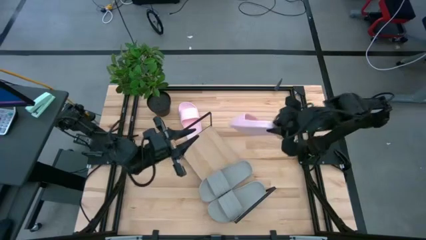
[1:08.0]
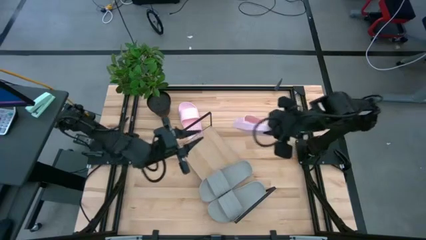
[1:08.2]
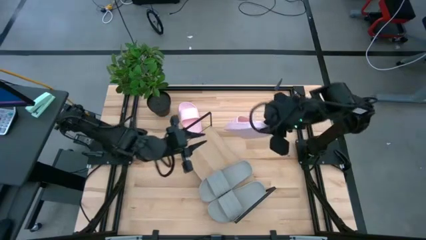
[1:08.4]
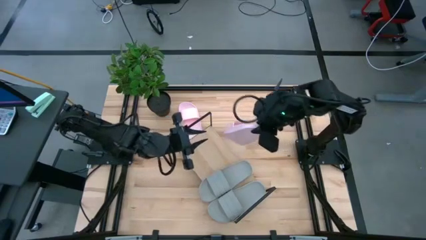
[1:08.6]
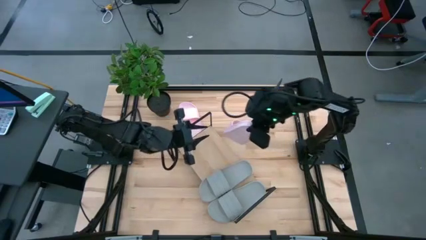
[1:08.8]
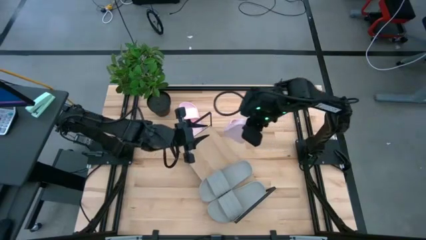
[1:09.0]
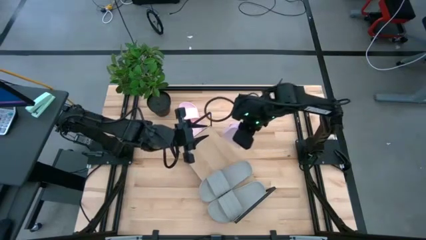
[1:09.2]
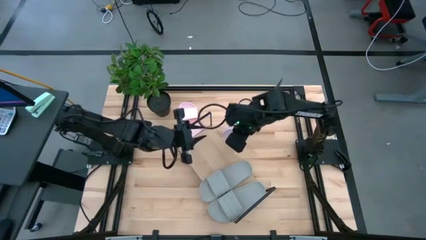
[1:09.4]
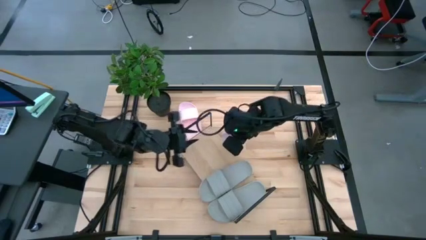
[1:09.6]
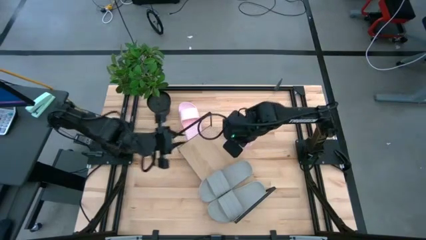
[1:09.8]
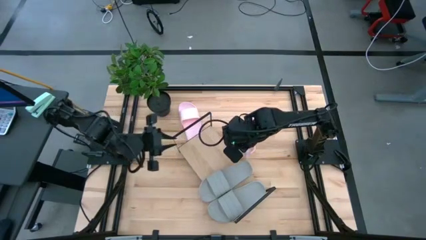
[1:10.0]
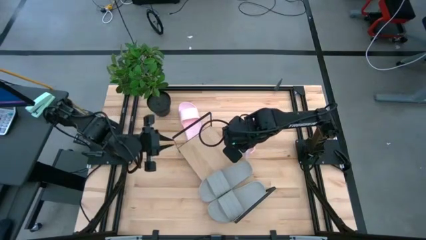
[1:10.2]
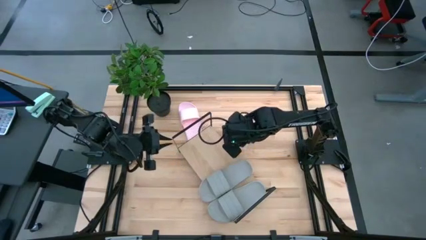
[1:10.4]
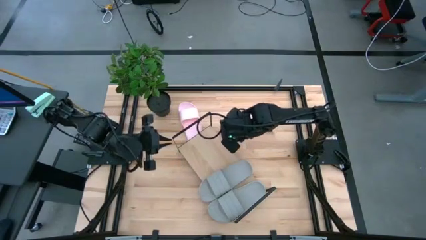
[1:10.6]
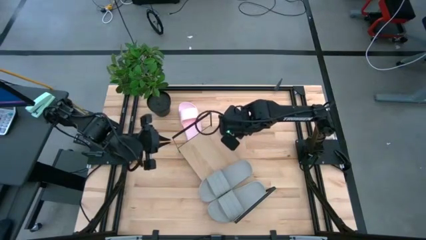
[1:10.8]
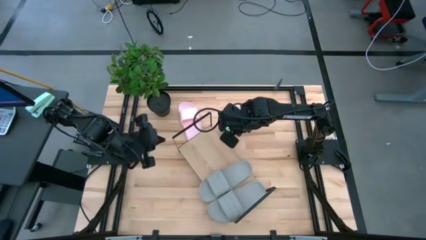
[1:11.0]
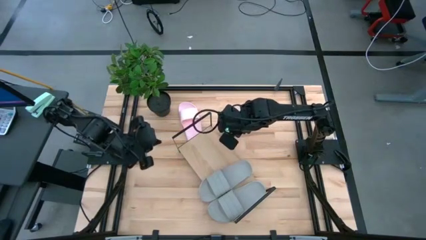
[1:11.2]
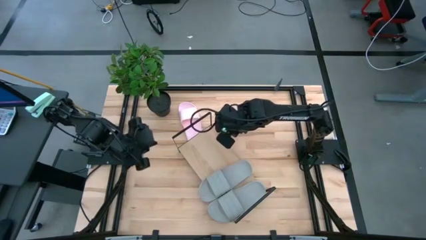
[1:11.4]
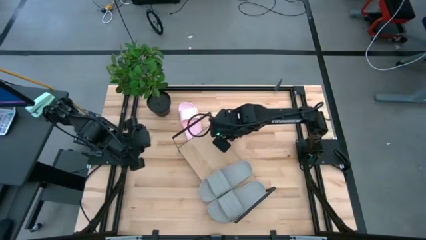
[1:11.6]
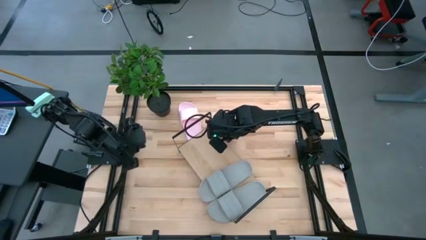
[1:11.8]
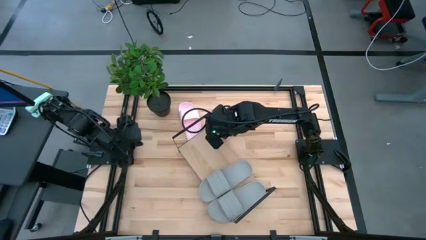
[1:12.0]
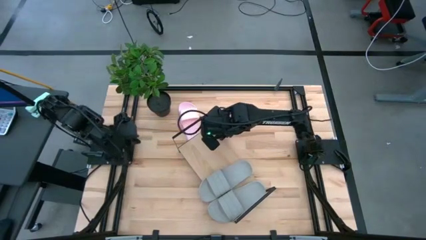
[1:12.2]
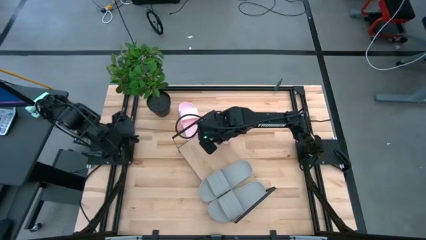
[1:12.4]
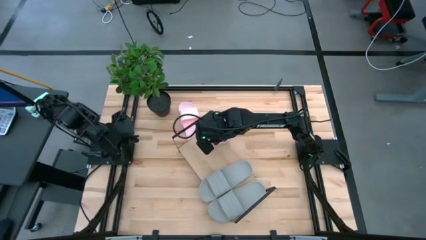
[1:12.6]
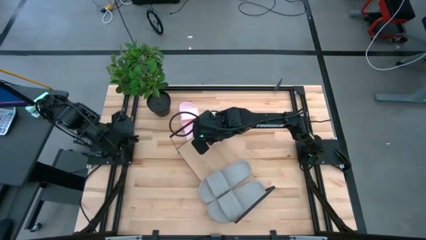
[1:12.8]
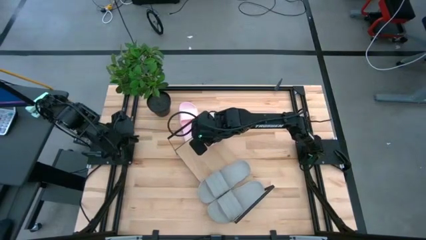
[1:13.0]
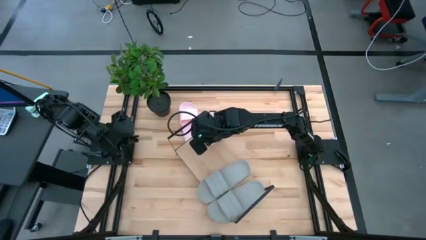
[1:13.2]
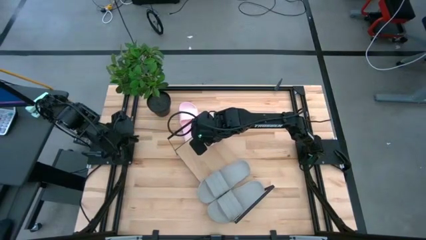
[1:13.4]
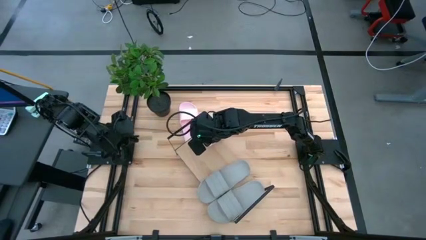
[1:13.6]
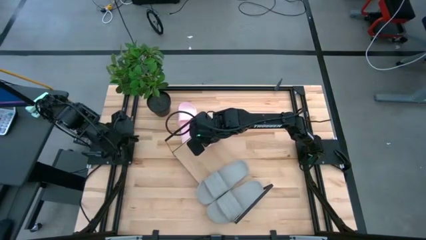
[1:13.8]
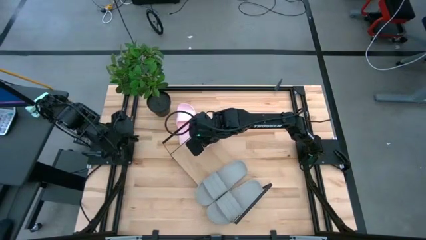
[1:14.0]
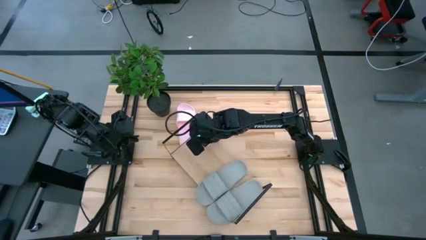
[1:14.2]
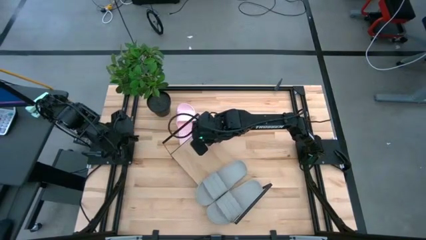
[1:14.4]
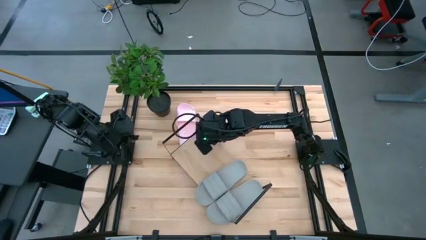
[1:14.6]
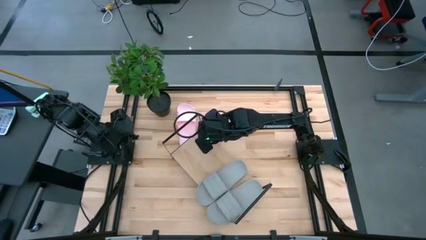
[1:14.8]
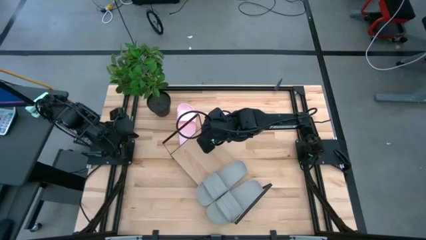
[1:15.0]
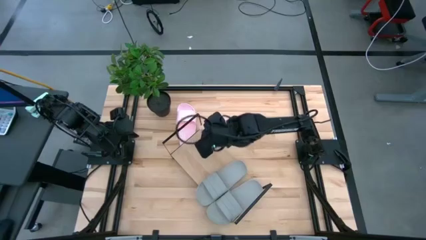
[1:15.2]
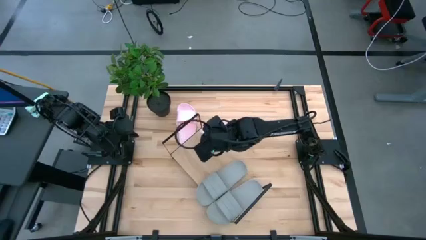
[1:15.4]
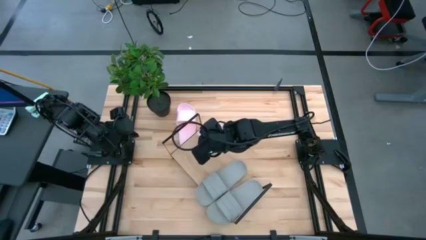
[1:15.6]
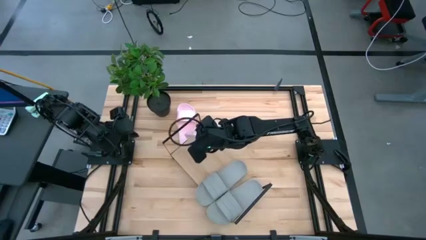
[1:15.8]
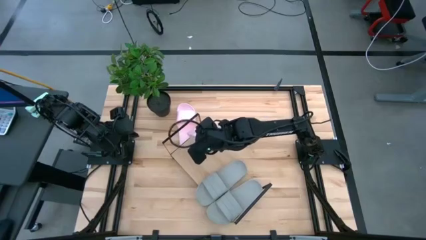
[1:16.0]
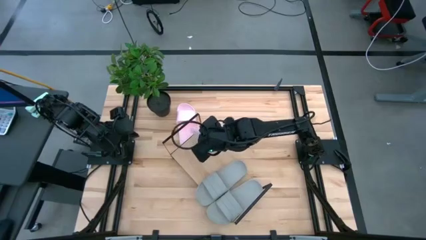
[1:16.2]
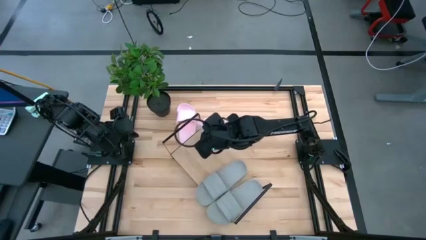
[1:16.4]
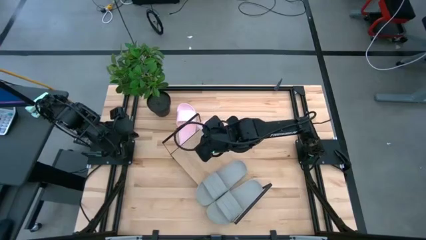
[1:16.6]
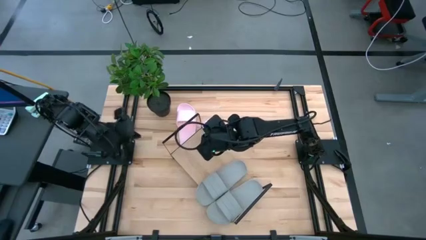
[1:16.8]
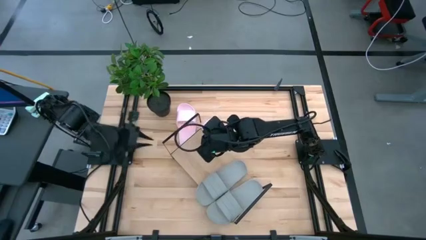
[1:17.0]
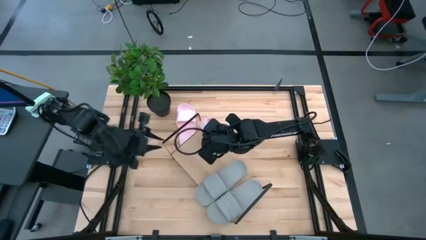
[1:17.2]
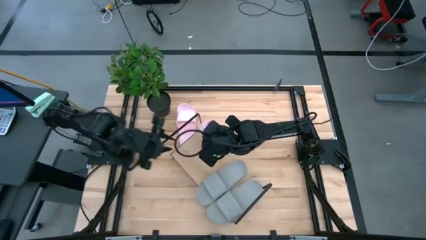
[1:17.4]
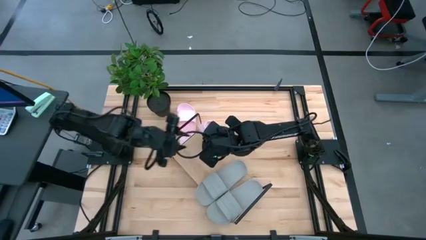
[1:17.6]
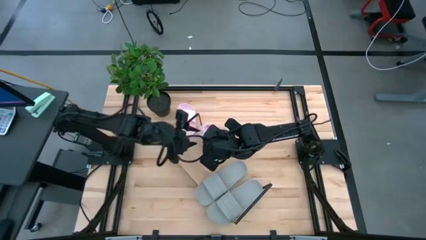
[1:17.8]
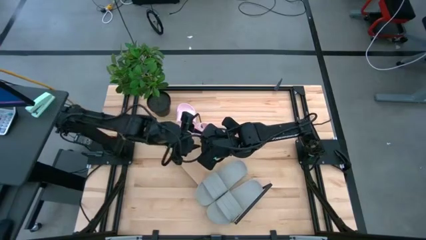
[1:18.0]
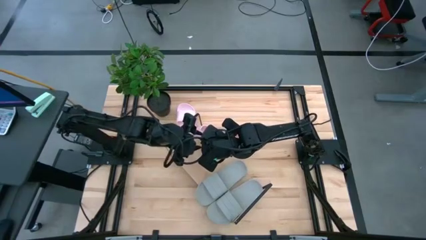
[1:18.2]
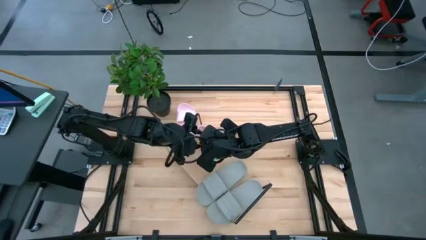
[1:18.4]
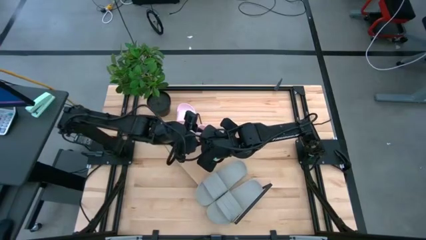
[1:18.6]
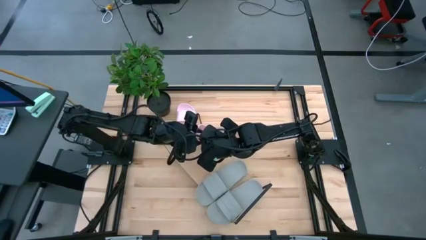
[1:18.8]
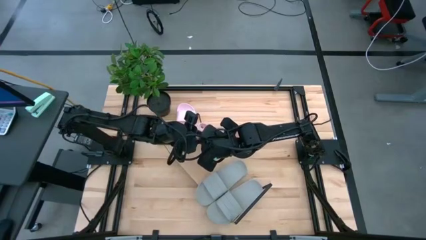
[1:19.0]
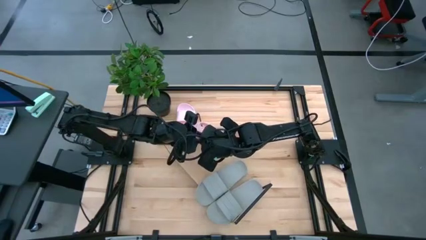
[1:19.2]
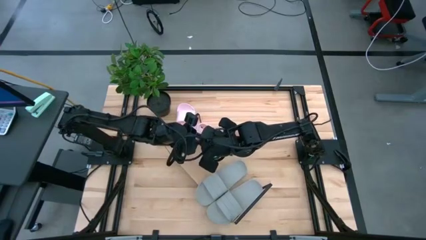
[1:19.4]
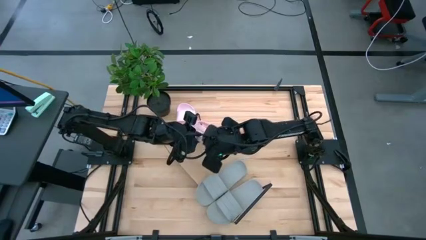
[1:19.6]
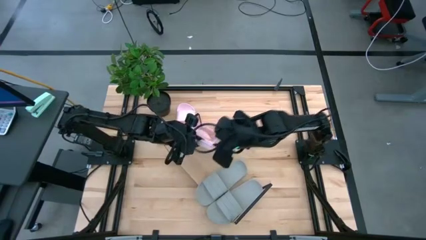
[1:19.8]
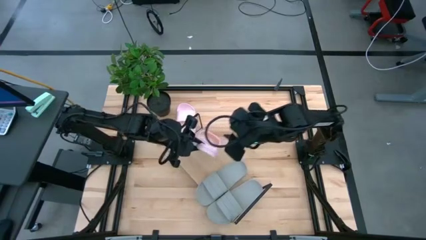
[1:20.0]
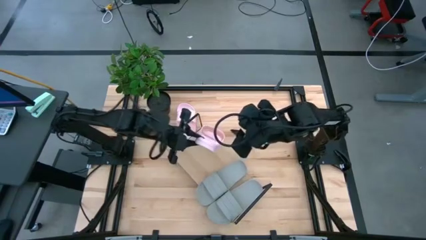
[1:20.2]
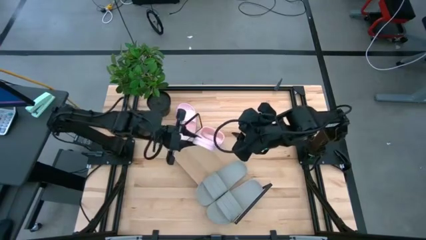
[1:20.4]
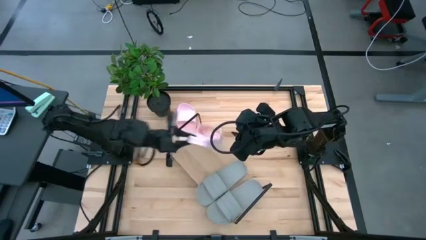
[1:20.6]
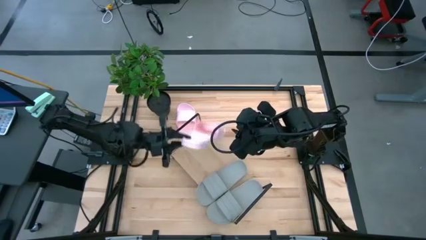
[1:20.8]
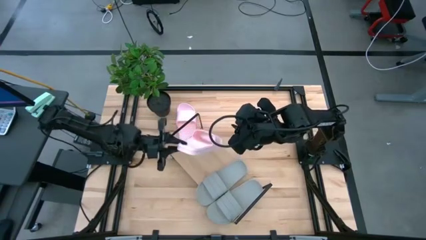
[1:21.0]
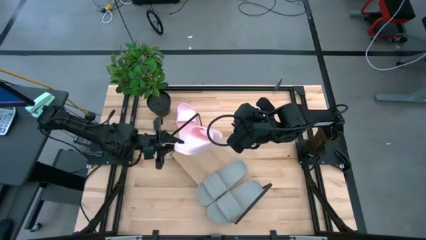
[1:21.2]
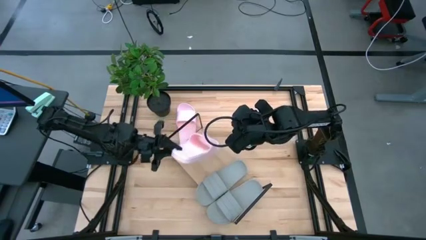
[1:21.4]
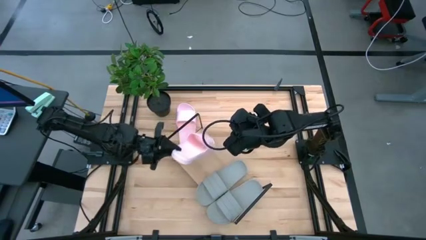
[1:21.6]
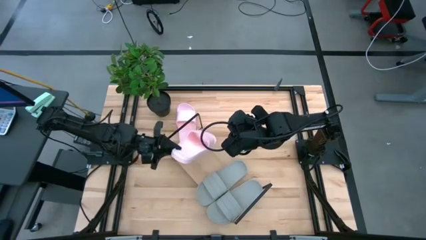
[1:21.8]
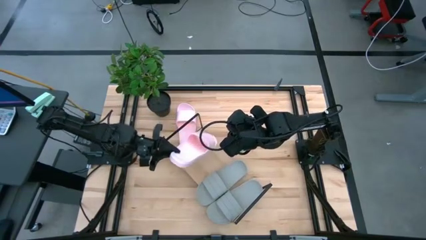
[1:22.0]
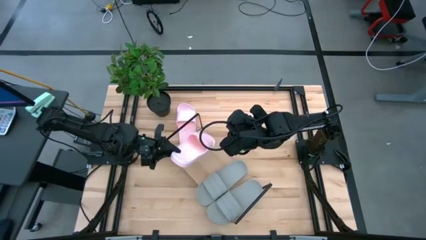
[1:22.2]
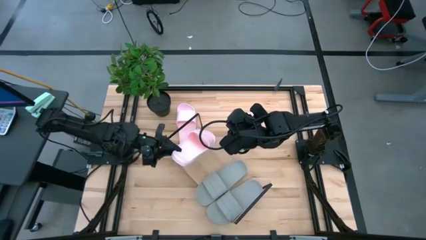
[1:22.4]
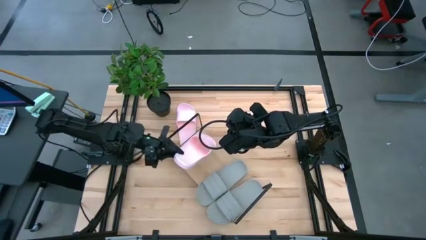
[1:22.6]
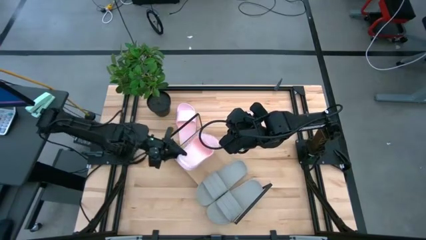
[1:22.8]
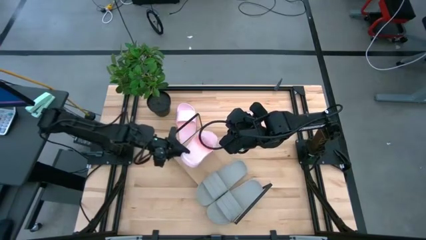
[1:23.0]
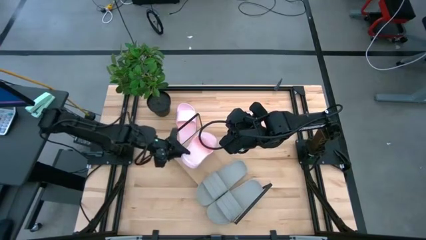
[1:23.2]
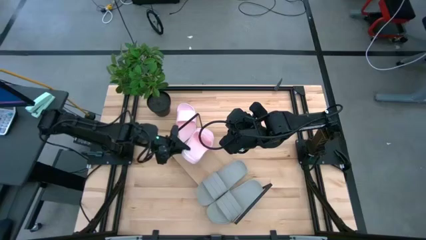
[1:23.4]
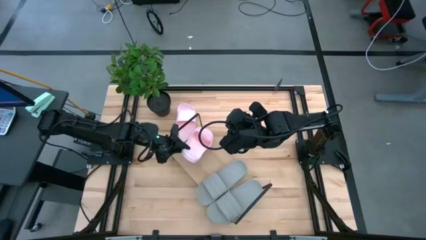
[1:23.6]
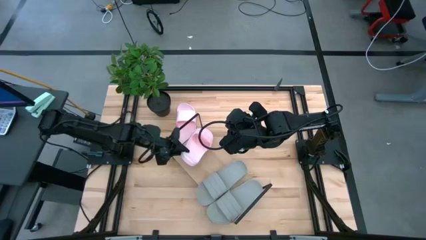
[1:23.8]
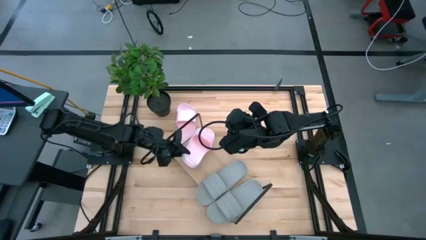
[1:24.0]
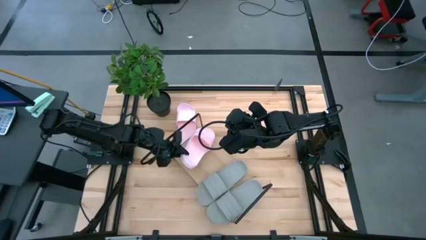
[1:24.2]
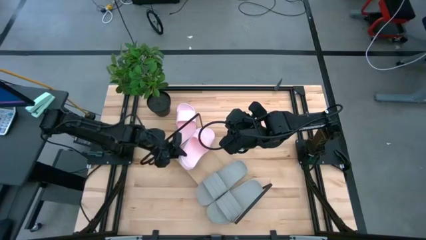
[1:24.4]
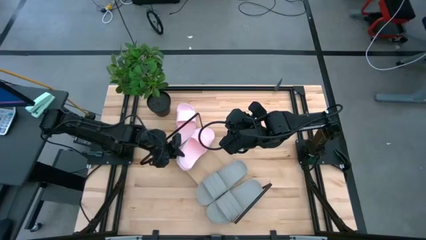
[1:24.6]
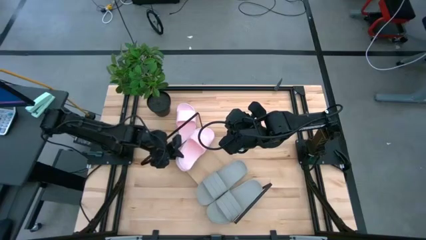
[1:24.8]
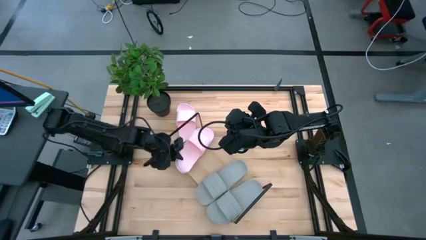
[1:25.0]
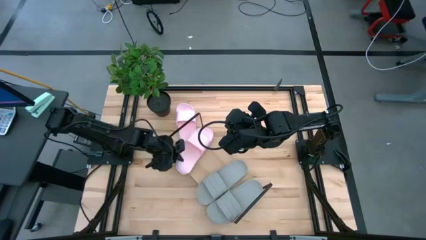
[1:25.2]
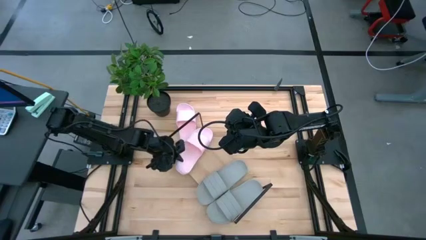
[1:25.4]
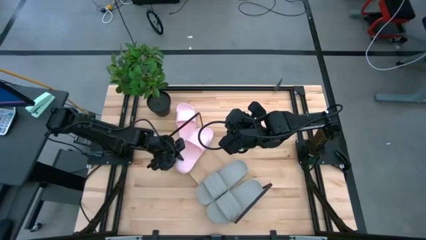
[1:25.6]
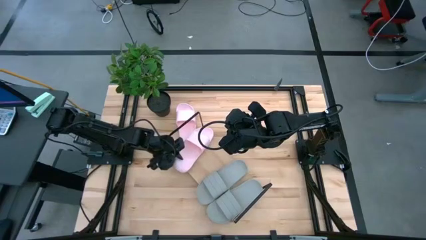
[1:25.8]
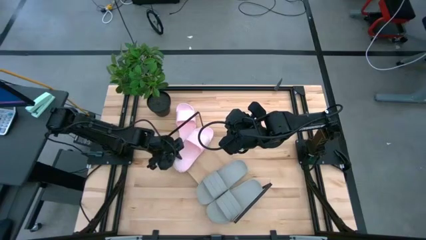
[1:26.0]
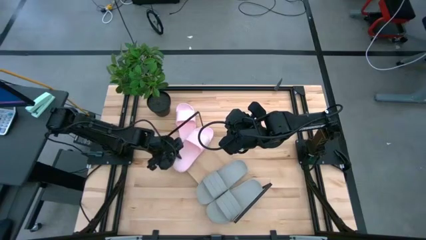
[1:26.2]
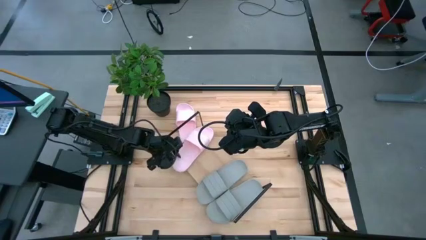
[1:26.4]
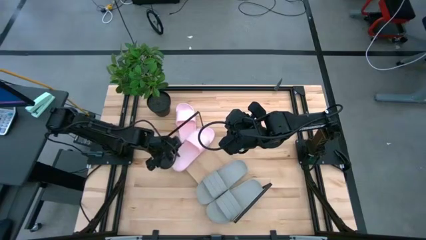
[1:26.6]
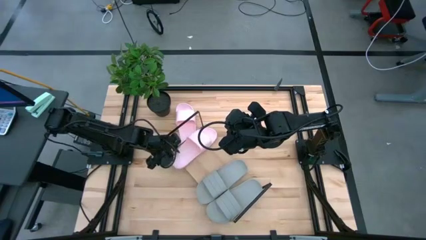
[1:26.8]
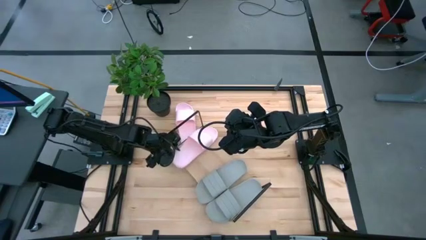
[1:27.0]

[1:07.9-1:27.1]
Task: Pick and place slides into the shelf
Put the bottom pink slide on the shelf
